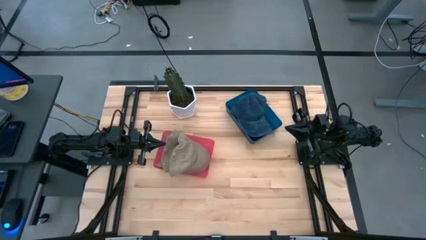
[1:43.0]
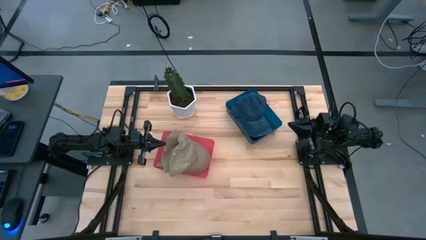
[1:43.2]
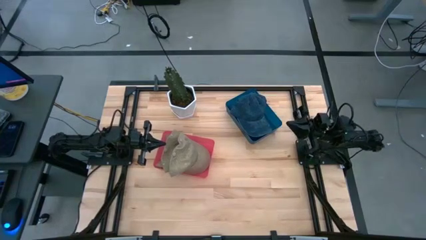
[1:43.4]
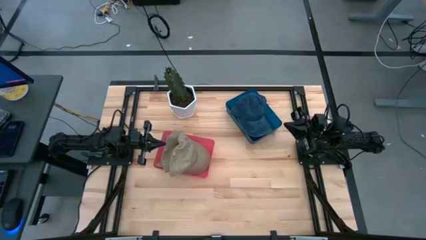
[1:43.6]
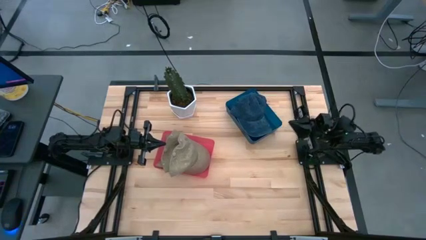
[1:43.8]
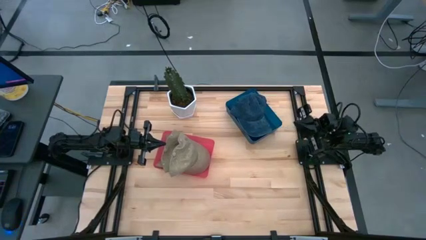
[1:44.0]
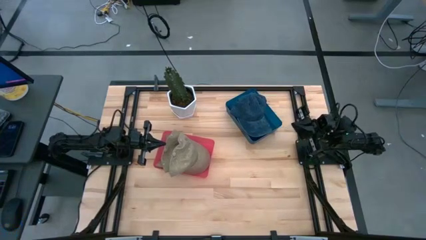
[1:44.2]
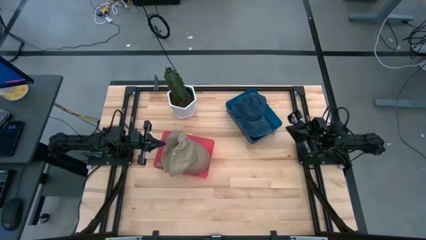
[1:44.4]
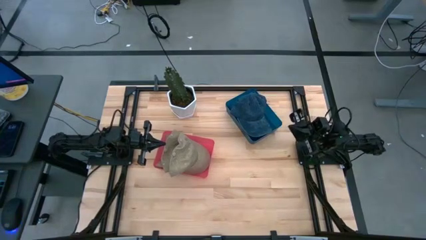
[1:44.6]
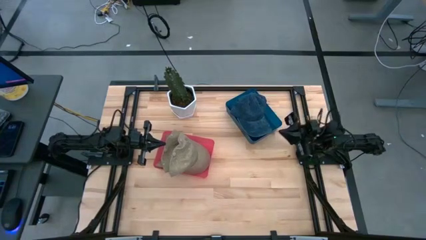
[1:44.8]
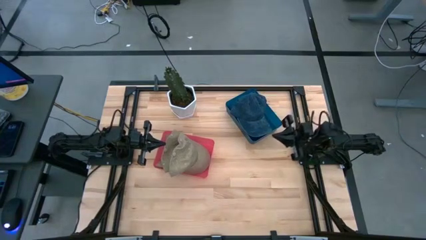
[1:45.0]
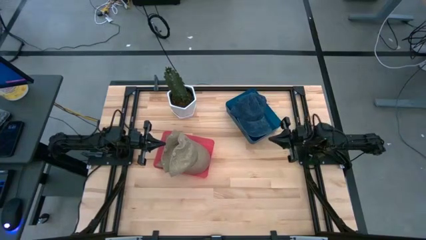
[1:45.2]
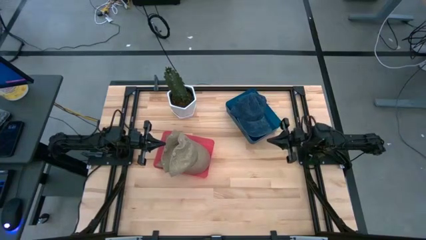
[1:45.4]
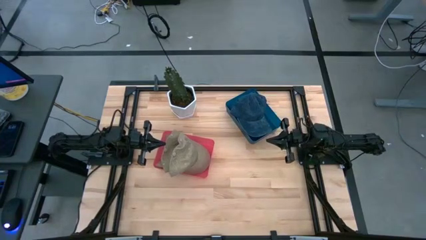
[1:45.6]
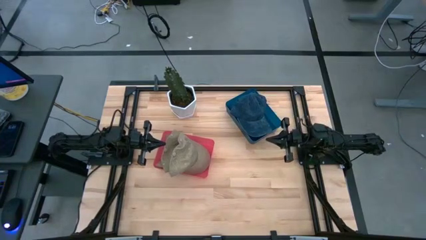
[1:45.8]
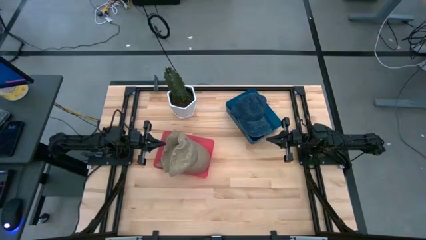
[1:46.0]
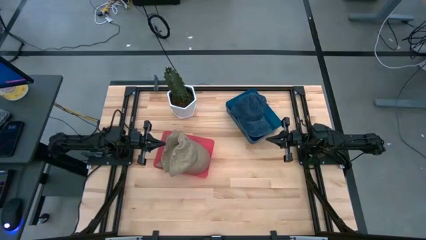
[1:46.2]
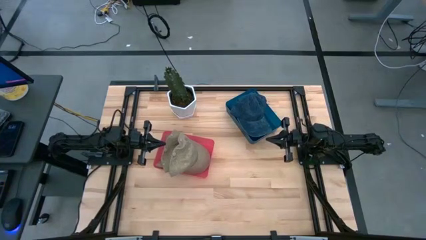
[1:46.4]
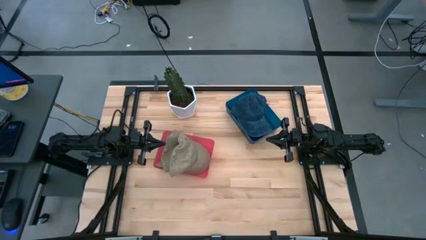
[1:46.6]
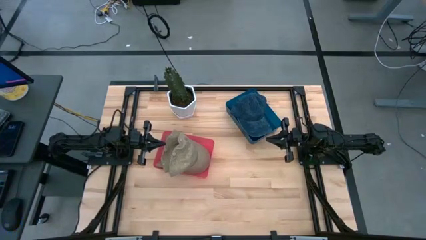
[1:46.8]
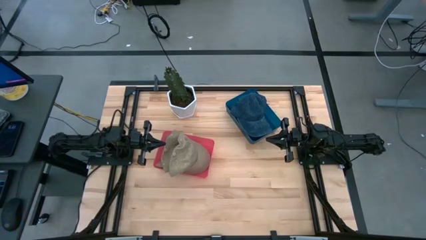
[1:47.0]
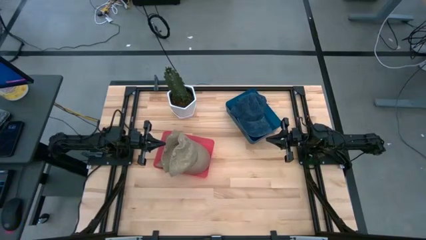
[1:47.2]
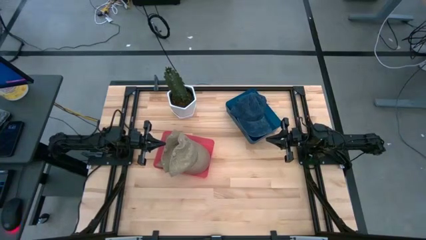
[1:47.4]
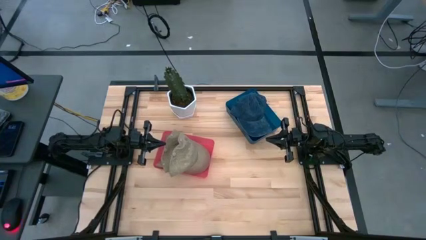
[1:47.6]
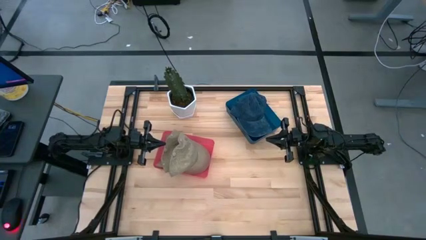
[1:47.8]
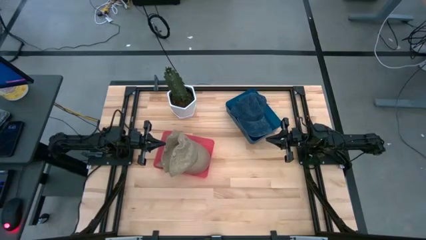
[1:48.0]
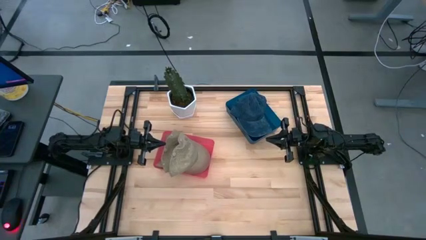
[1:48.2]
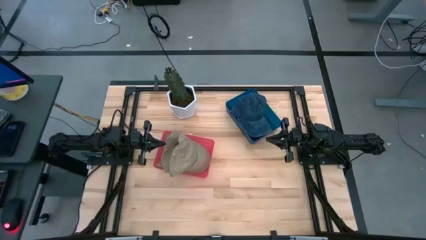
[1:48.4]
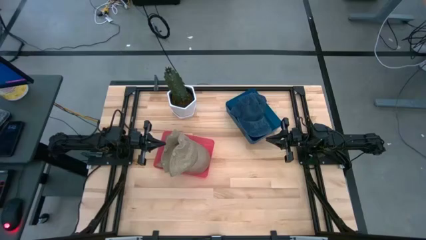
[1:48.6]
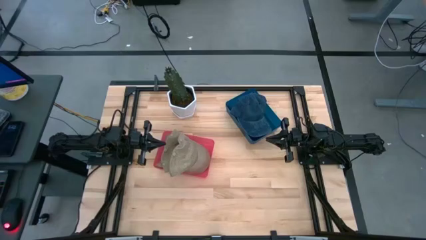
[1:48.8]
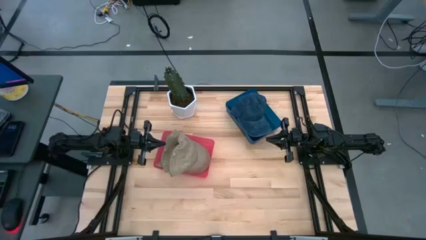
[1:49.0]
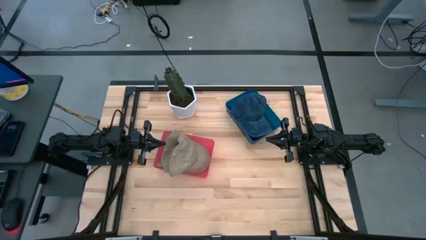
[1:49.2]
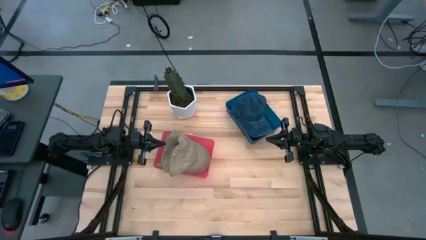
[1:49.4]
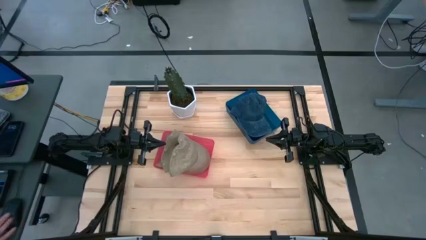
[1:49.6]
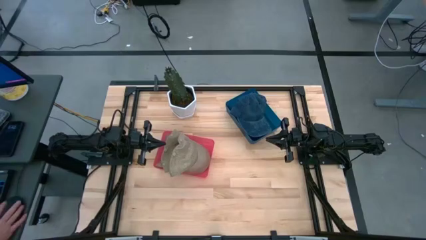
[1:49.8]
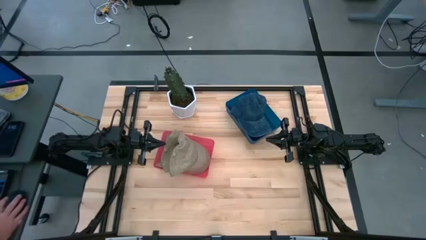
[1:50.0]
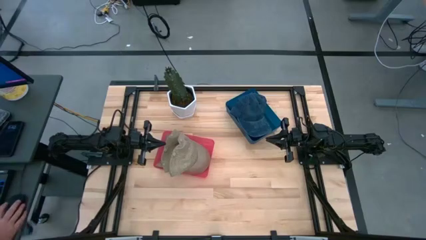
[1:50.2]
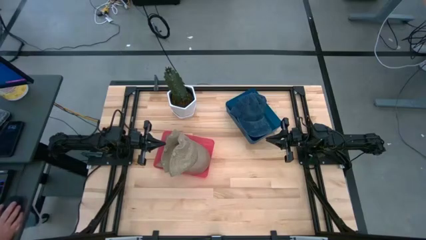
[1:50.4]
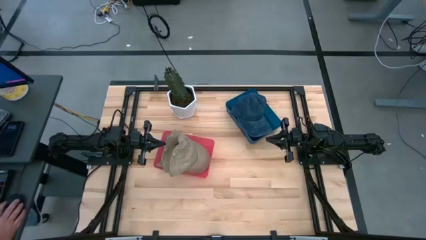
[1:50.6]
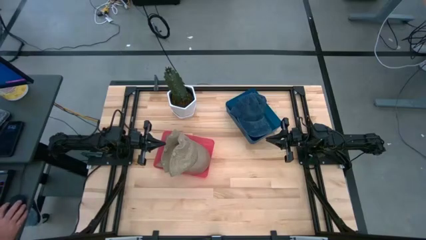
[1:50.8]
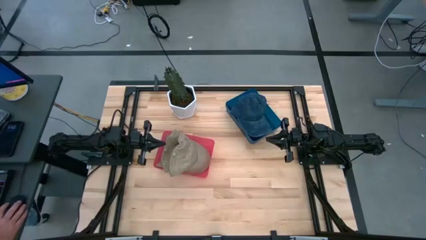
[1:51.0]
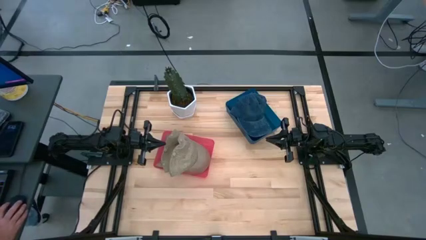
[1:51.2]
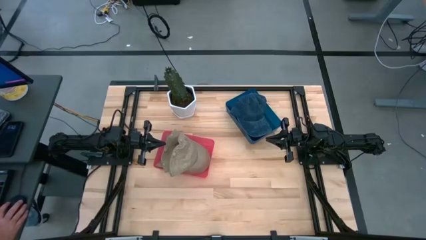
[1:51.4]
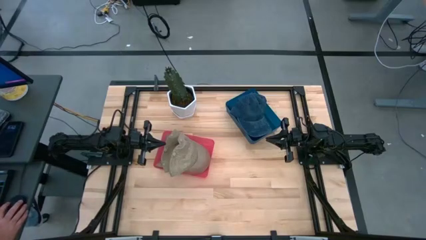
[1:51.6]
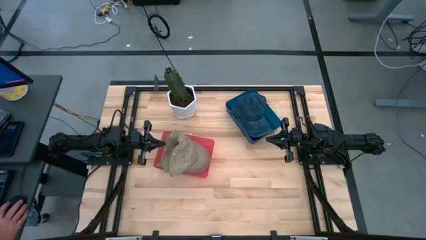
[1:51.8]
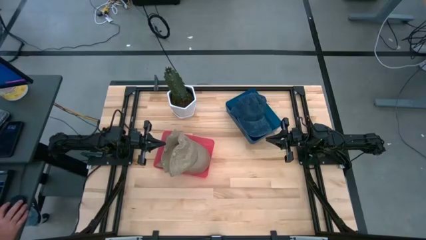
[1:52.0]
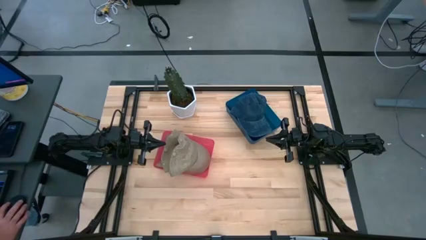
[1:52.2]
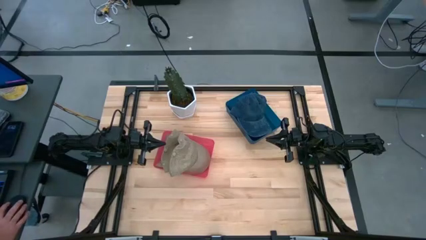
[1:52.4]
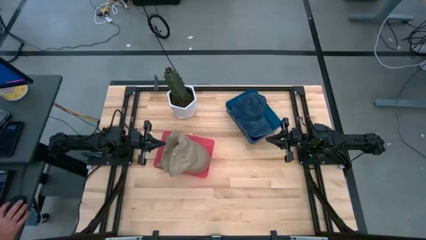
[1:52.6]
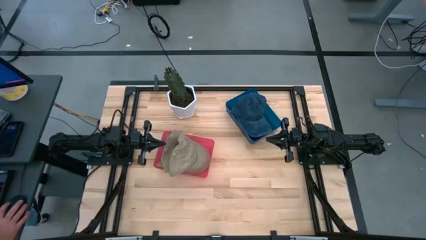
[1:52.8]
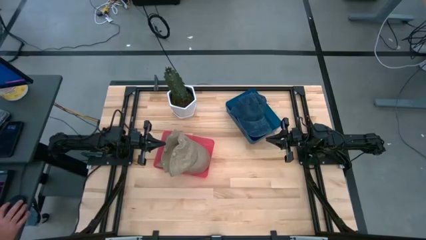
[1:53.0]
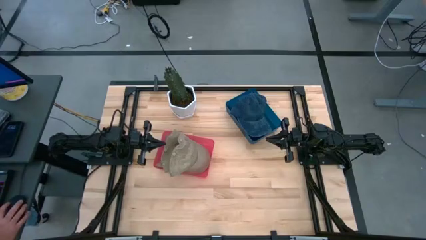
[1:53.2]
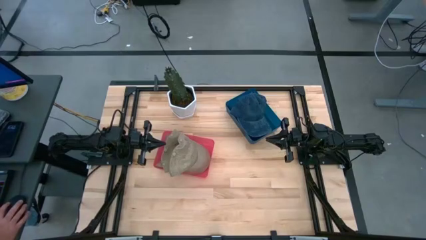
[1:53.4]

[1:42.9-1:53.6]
Task: Pick & Place hat
Return to Home Position

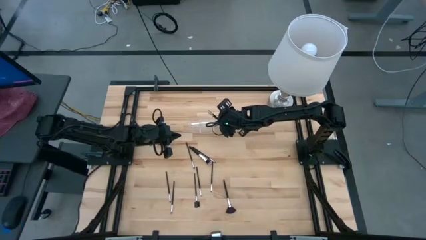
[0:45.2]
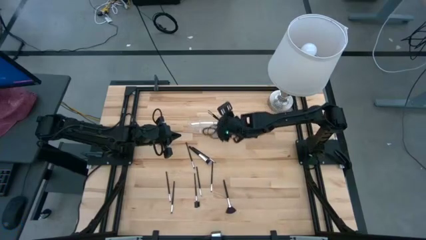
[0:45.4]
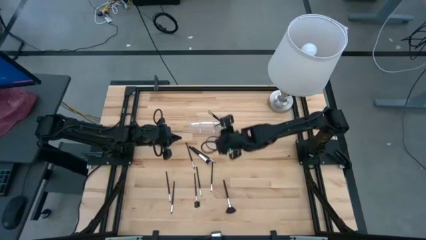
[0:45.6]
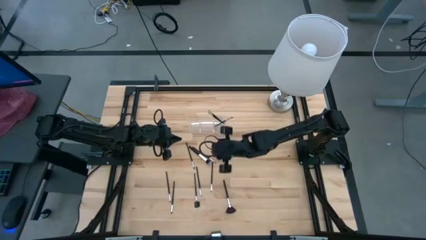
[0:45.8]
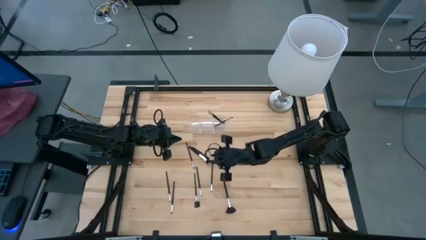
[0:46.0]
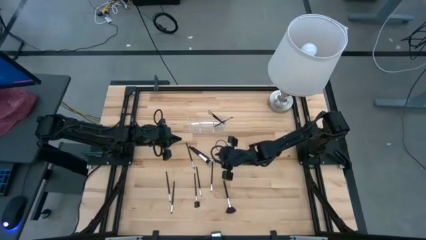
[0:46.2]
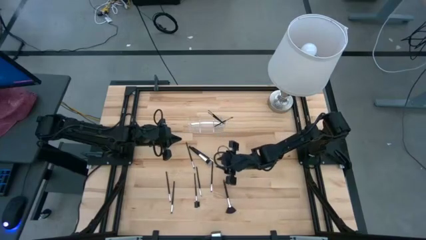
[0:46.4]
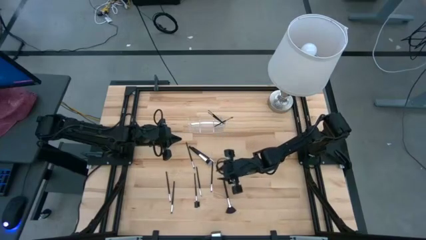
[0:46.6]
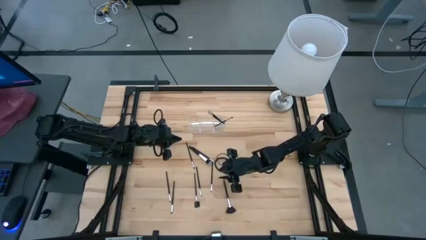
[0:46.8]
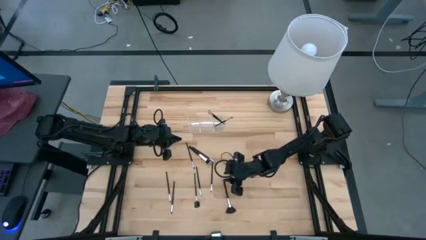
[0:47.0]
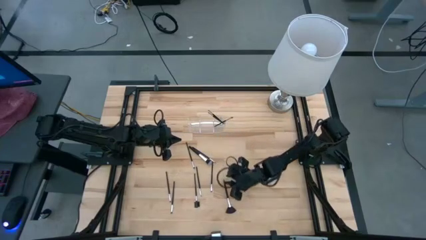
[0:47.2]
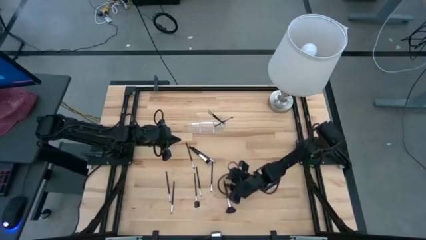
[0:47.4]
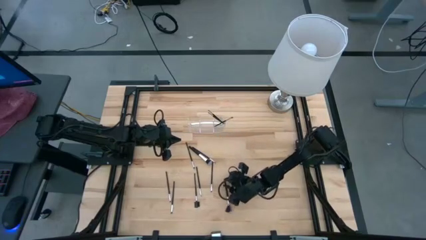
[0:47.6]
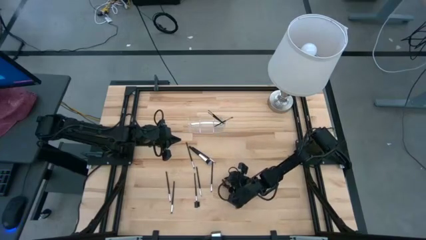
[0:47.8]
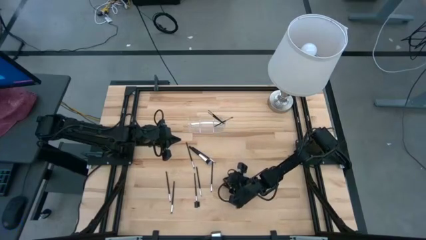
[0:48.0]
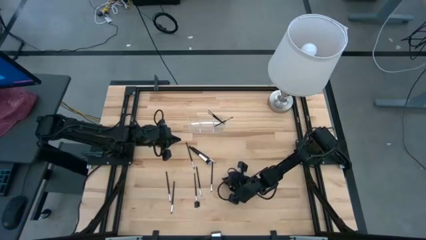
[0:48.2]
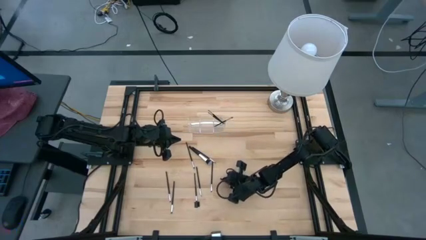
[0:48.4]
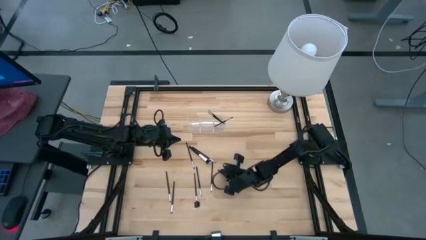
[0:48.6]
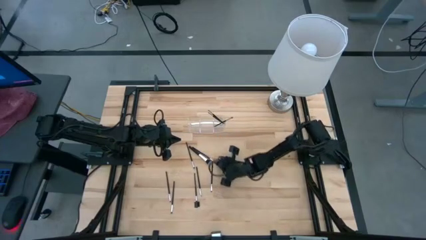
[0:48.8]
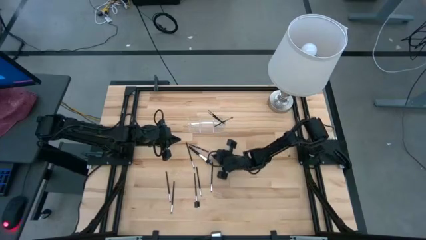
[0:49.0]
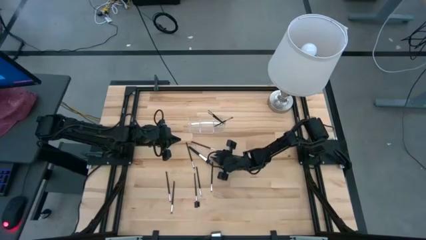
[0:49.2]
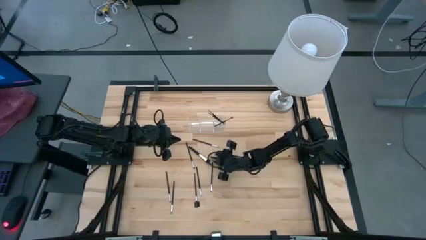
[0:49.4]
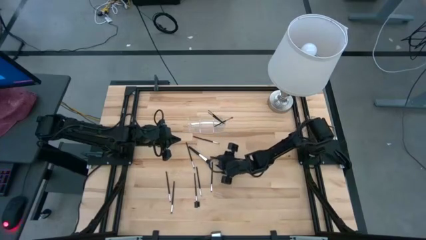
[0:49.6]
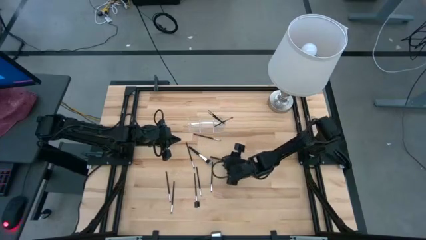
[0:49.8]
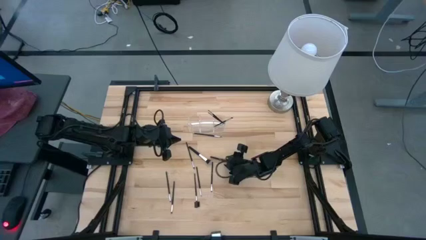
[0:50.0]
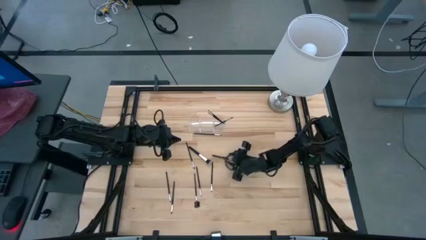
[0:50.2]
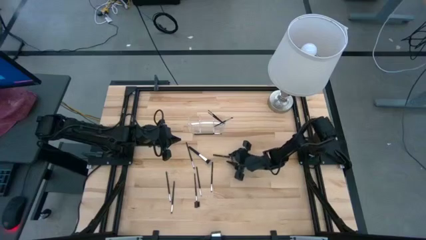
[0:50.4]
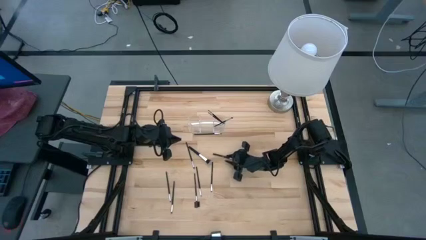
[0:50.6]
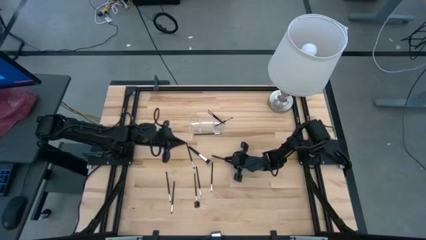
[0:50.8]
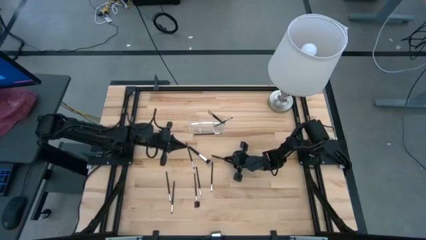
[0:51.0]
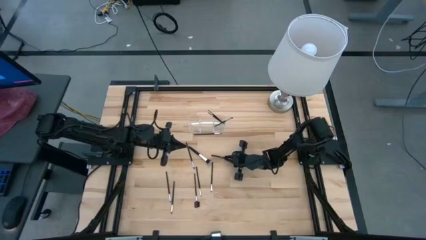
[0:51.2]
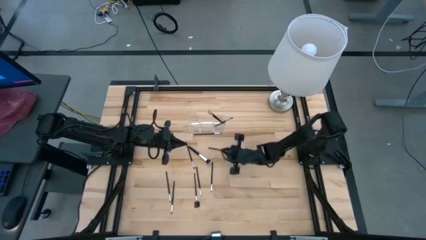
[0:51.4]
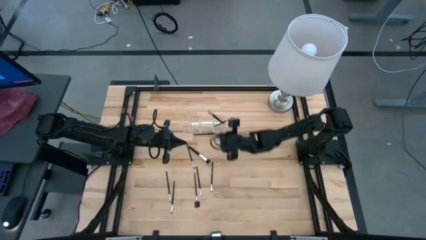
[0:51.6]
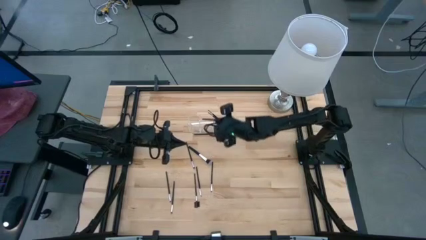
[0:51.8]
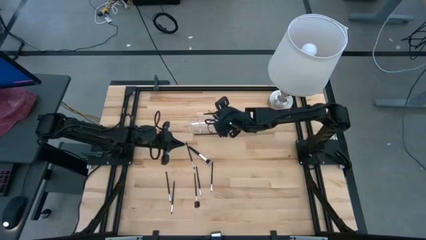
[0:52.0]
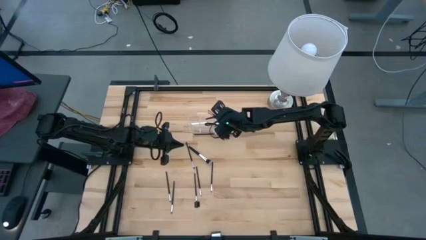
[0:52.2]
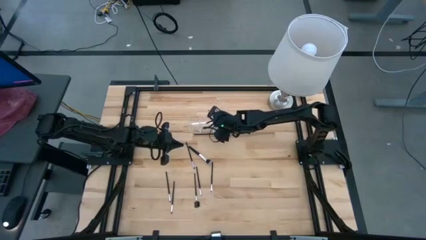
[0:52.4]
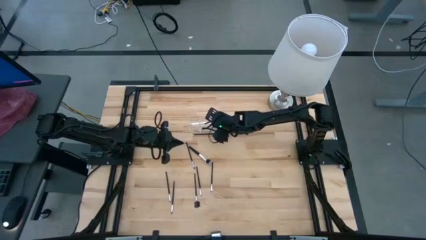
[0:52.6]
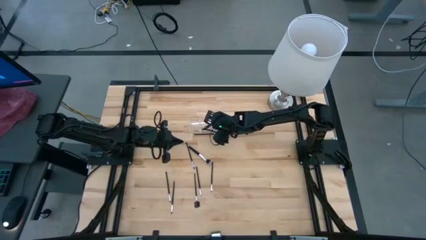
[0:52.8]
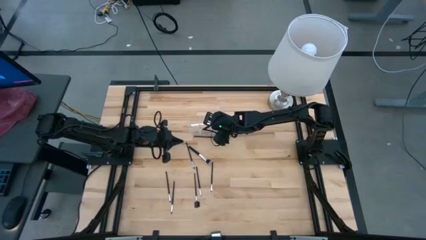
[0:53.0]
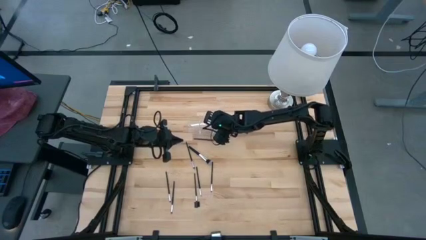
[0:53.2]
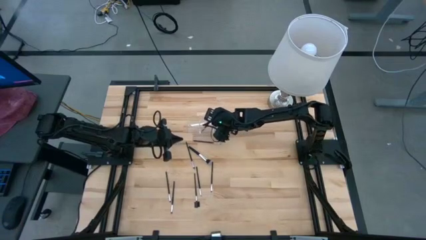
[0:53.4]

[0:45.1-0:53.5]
Task: Put items in baskets/containers
Put the black highlighter brush into the transparent organizer
